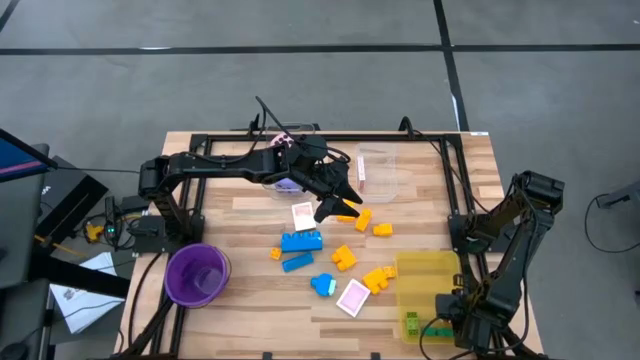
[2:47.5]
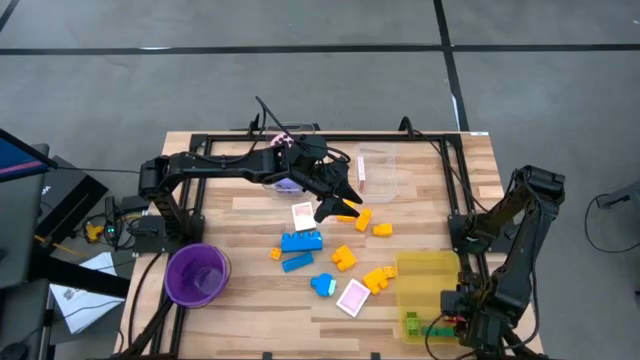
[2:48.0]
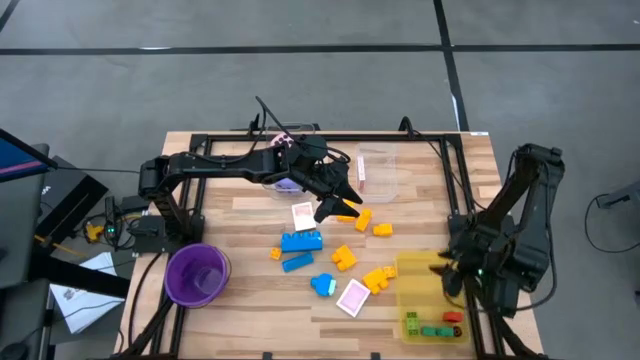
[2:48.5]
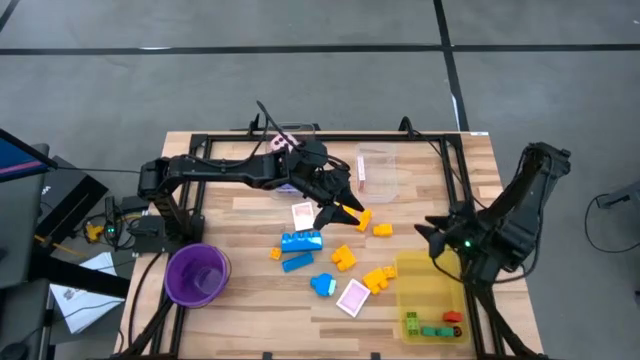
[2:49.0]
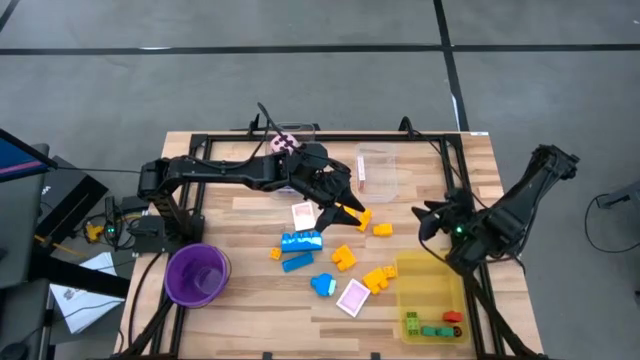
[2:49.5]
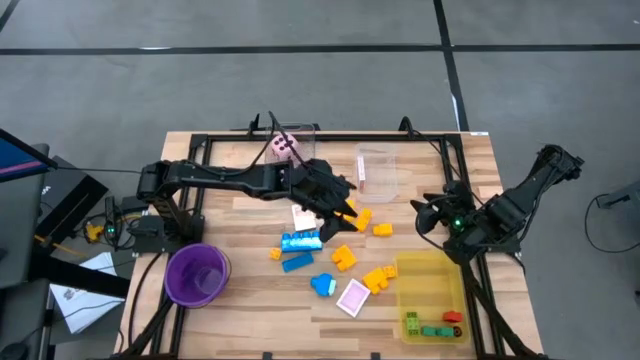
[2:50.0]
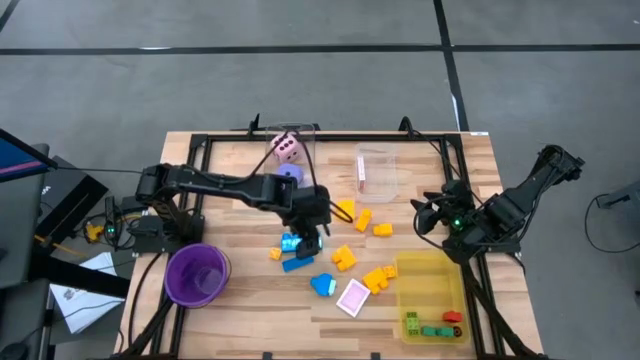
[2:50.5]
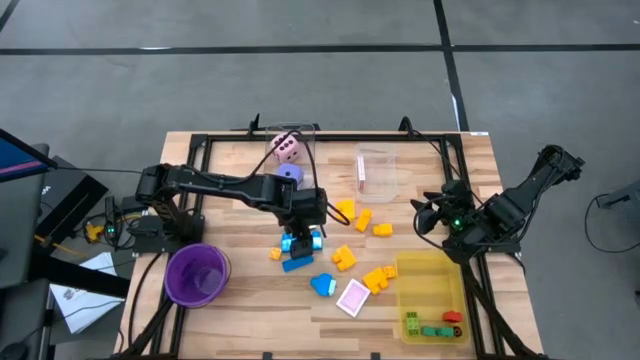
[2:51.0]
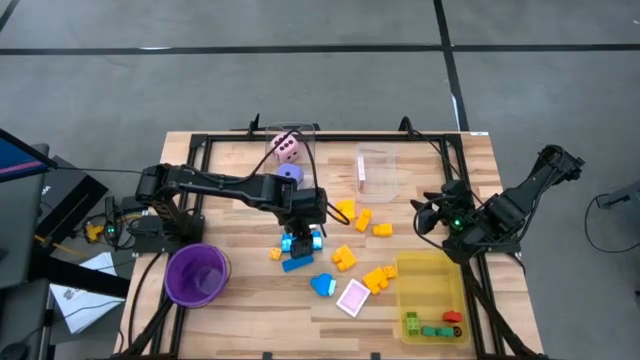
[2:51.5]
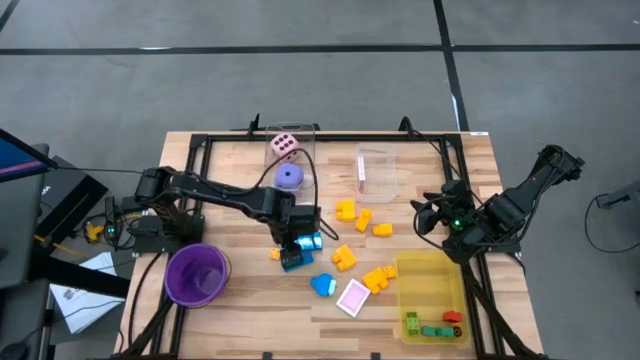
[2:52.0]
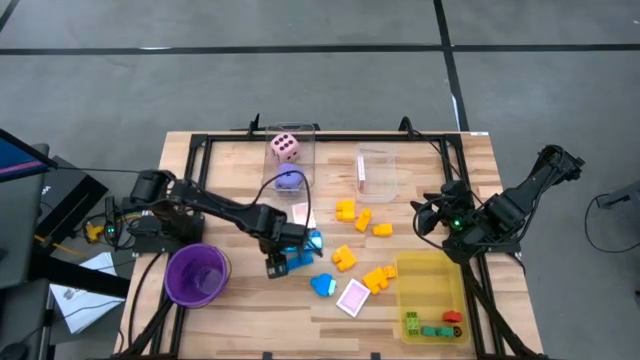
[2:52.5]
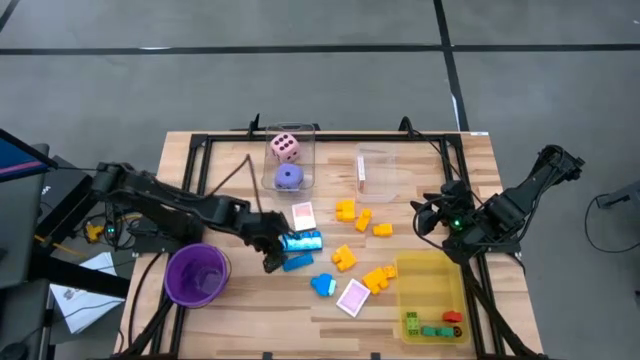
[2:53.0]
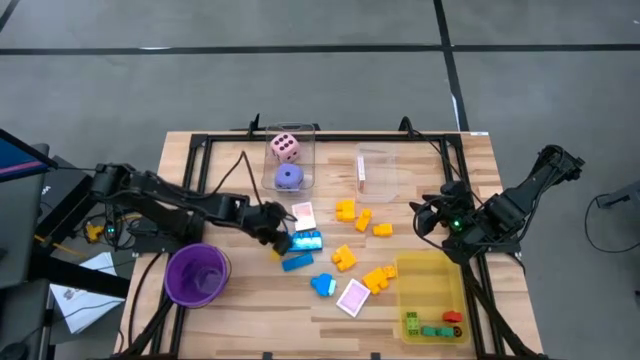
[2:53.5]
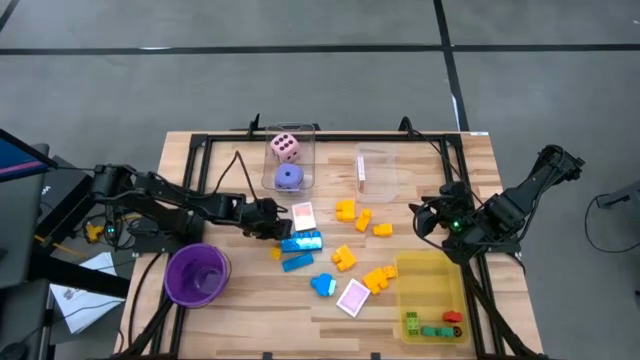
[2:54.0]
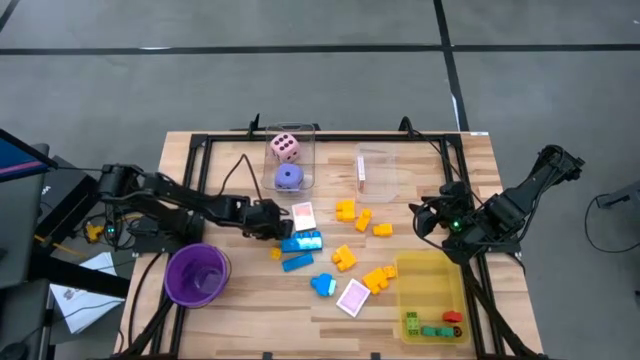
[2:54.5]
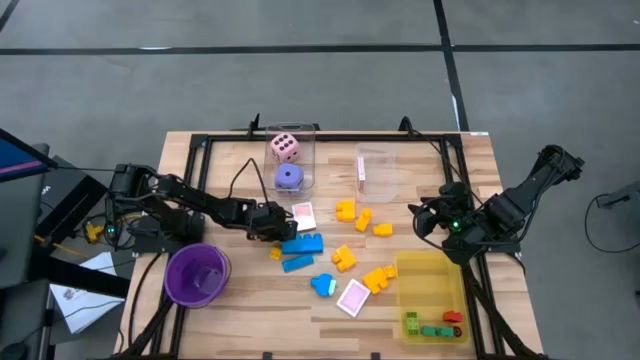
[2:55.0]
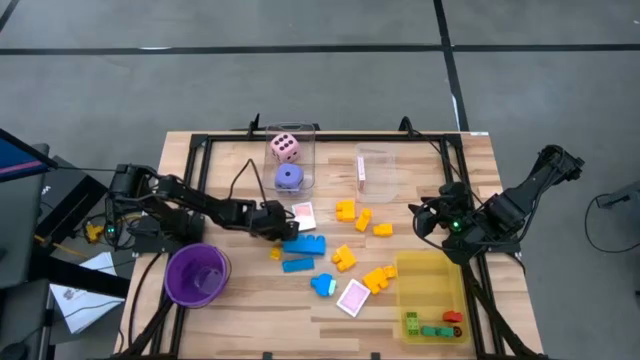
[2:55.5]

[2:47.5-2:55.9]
Task: Pick & Place Toys
Put the top blue game piece into the bin

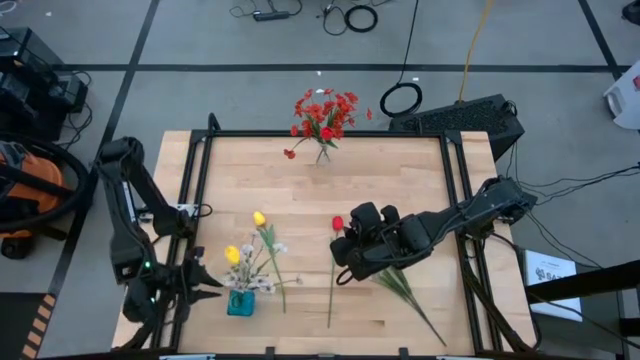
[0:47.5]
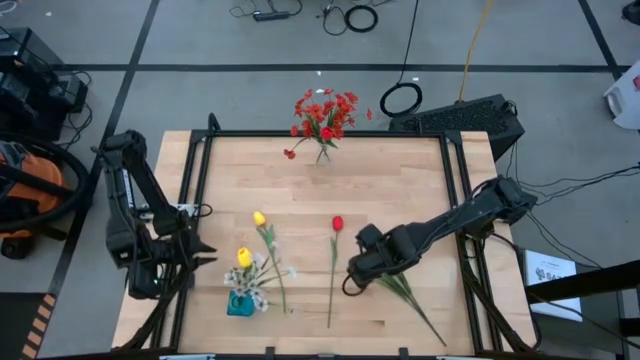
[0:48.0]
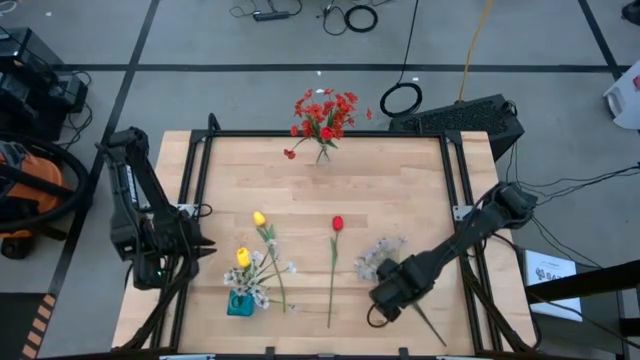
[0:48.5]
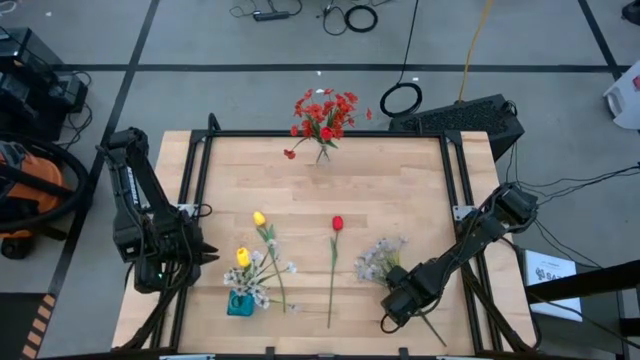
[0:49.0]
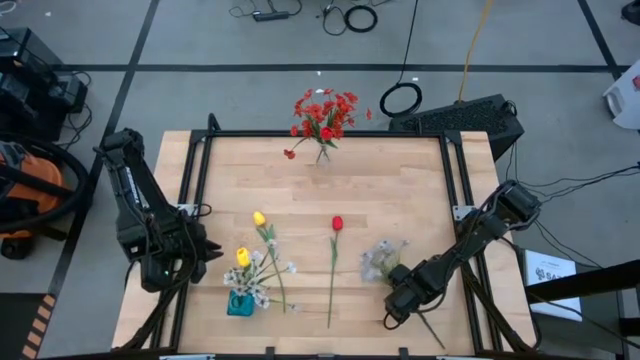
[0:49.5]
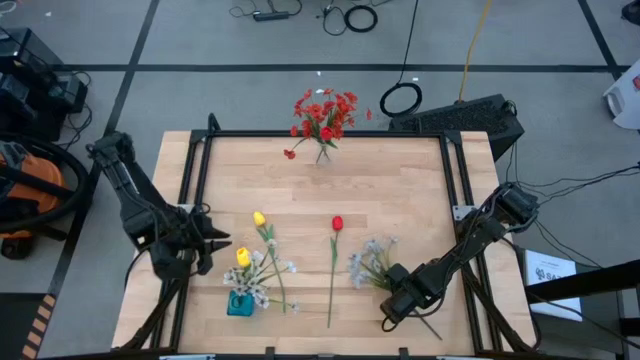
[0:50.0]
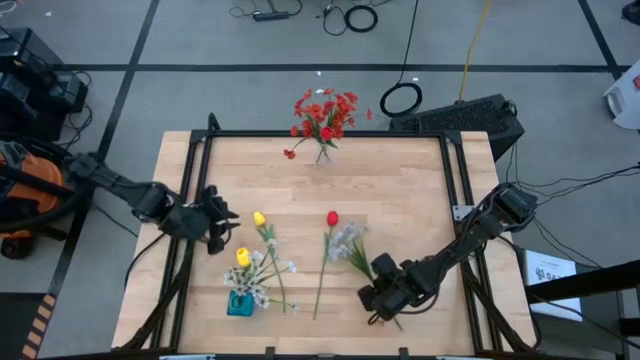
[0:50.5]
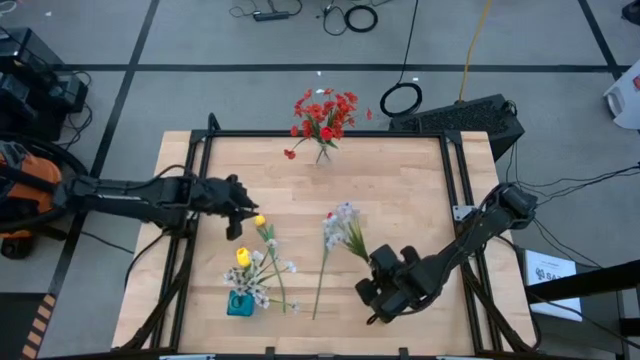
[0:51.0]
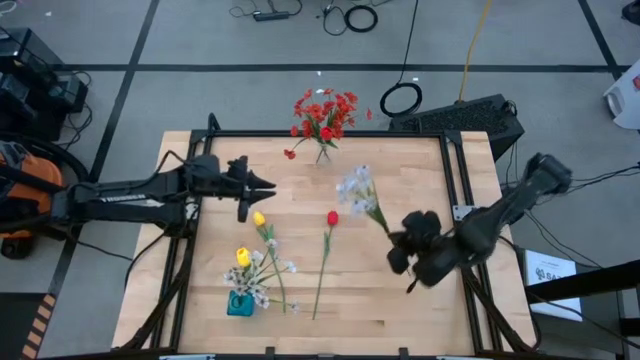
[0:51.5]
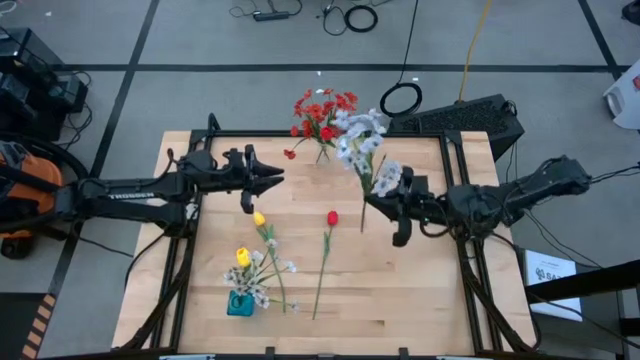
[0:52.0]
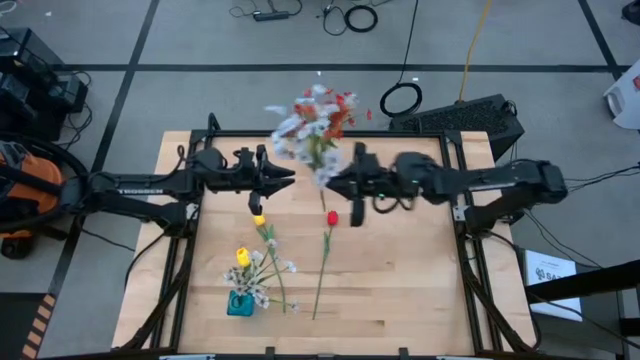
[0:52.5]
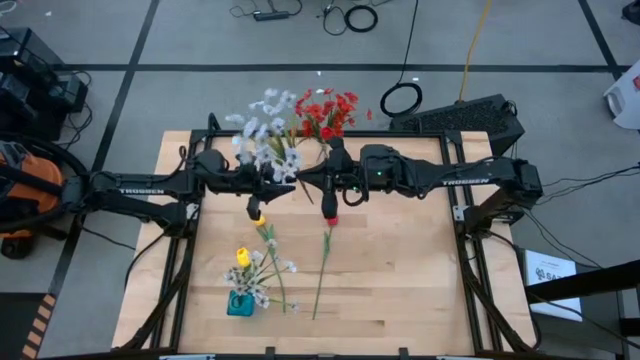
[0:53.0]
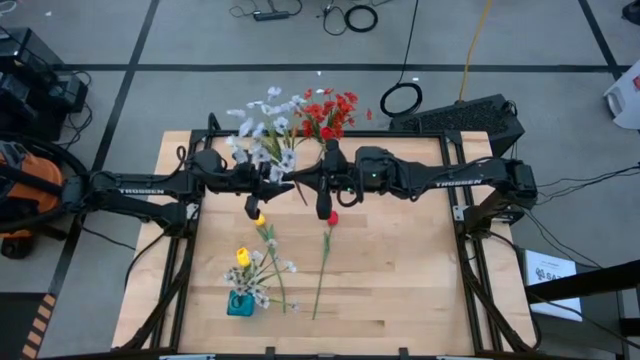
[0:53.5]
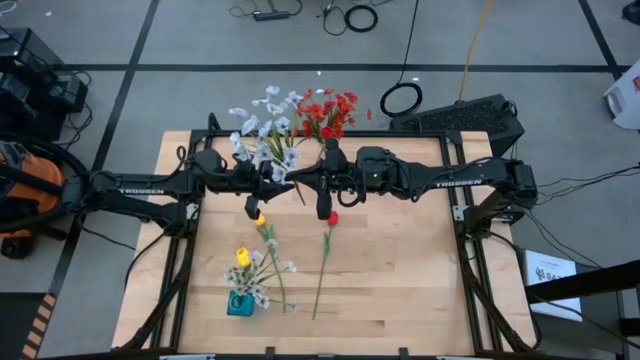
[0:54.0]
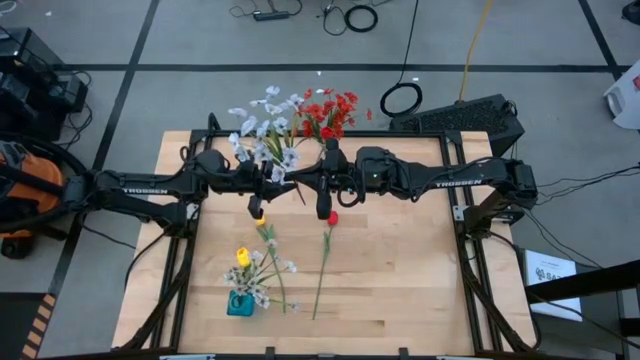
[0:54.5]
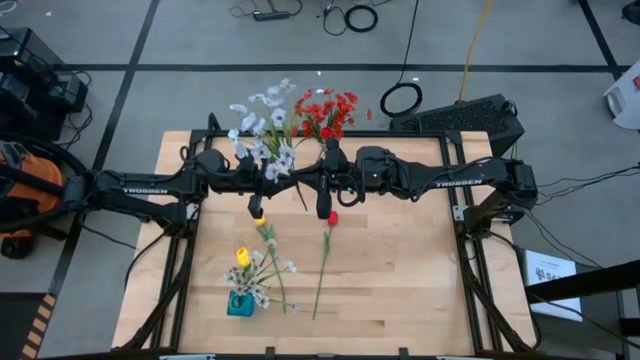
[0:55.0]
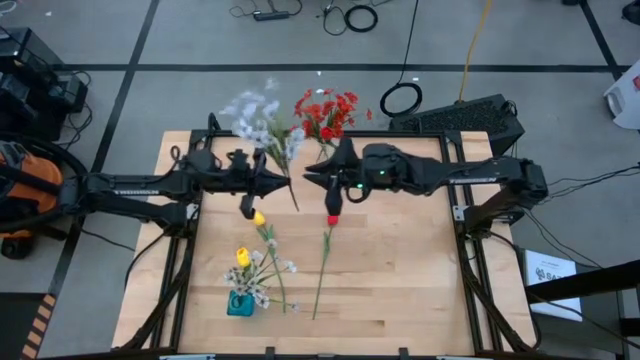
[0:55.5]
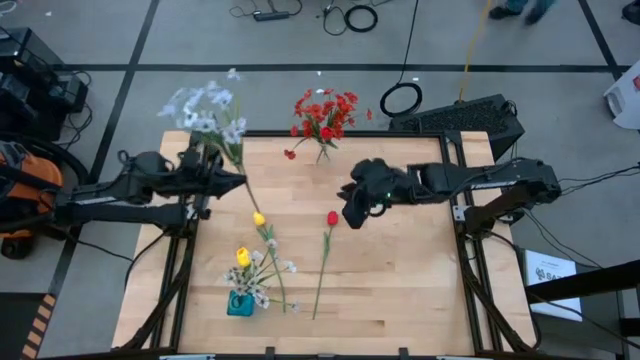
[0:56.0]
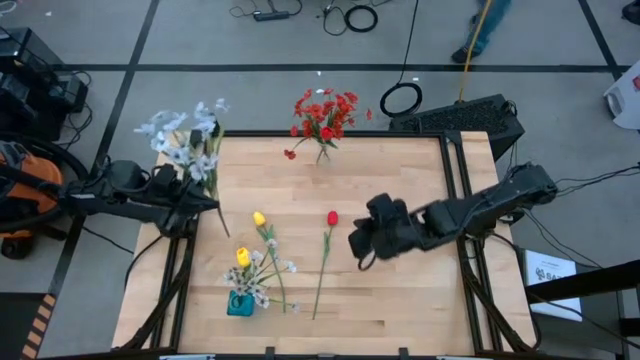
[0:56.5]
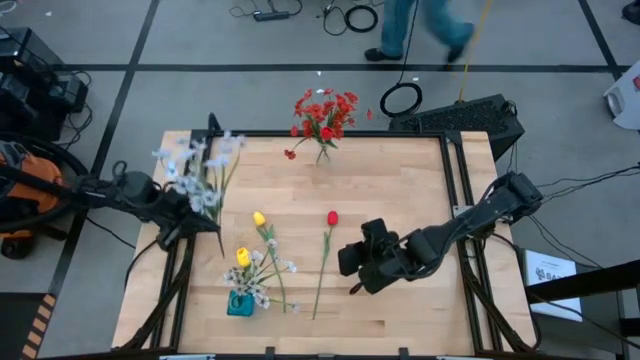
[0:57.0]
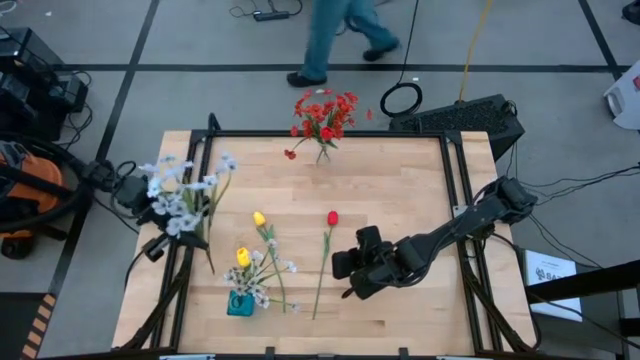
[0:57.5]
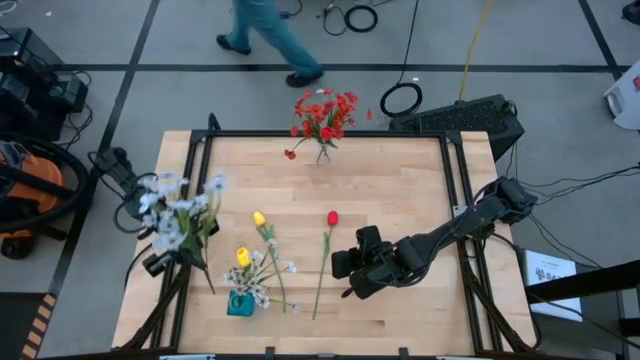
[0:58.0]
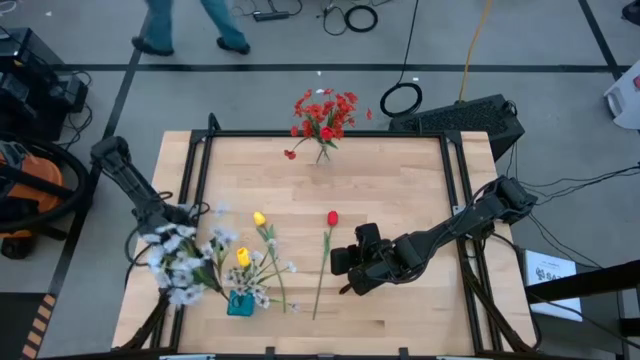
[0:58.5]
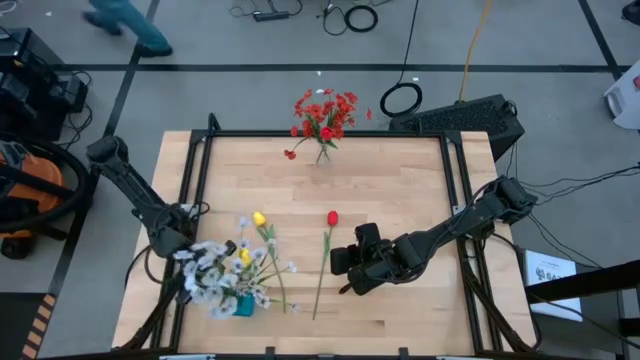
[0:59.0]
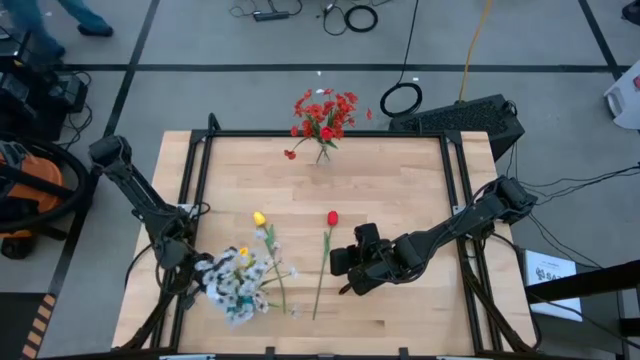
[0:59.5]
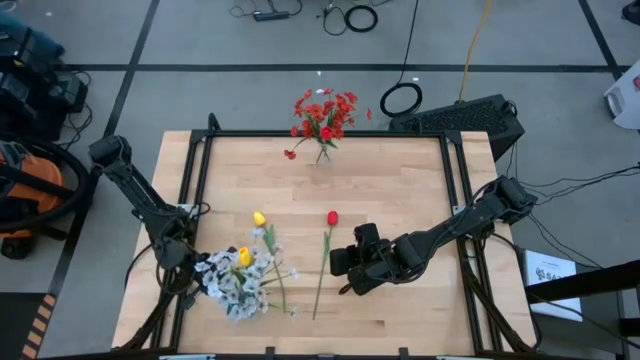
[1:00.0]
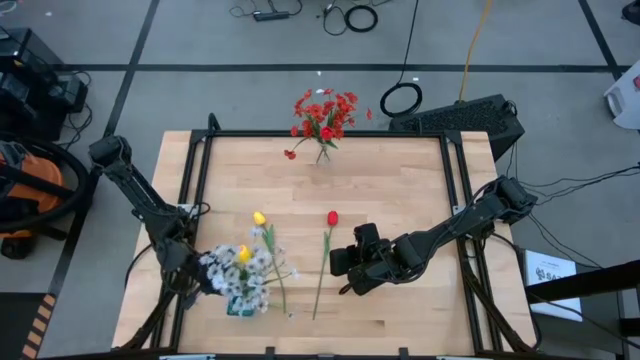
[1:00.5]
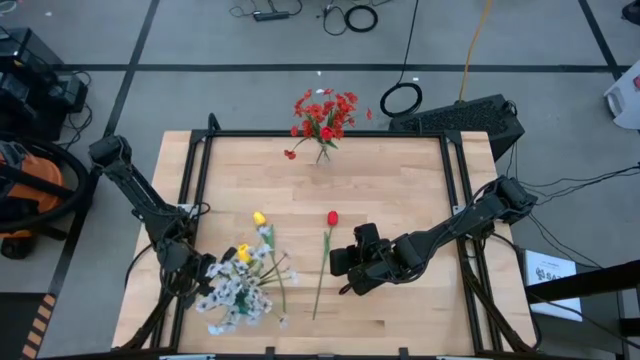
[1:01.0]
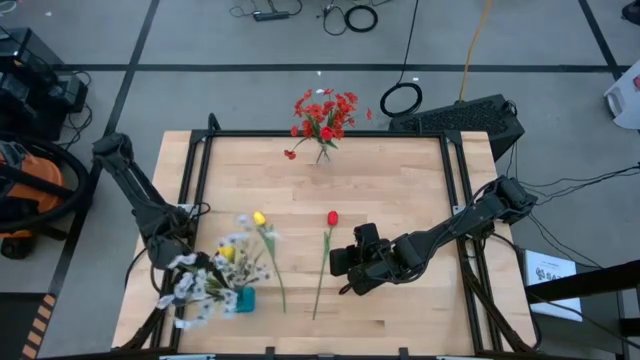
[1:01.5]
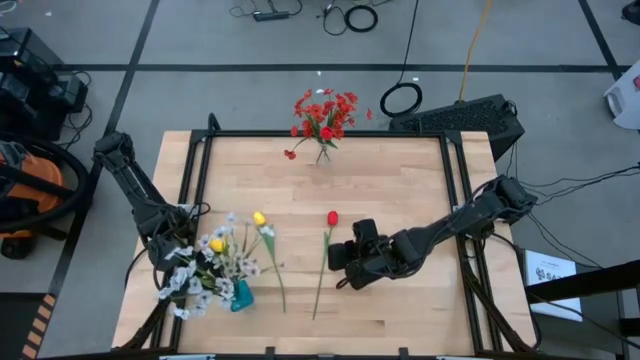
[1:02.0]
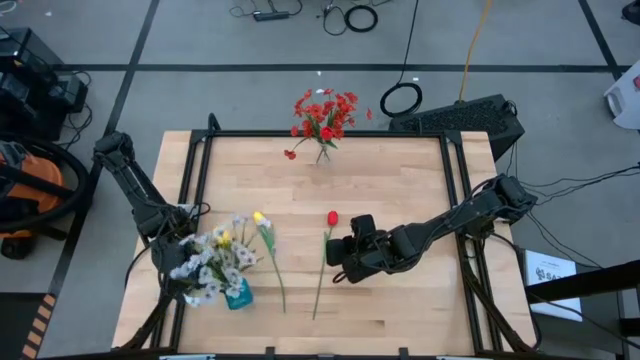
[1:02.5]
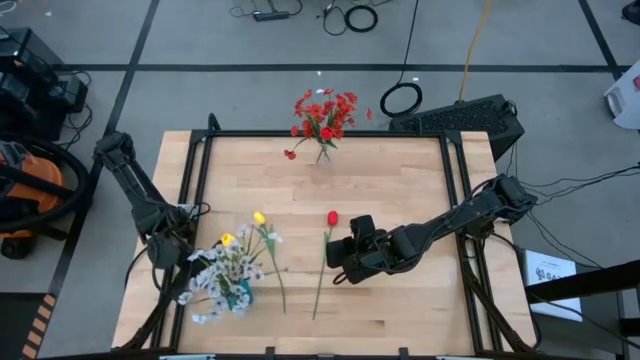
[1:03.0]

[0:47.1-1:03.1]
Task: Sort flowers into vase by color
Put the white flowers into the blue vase
